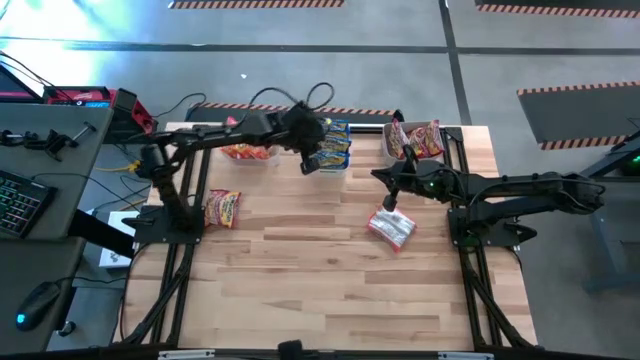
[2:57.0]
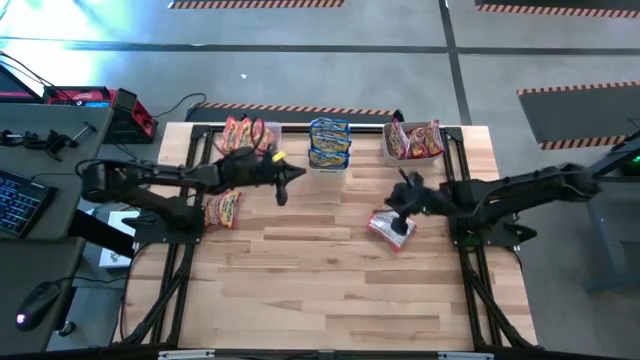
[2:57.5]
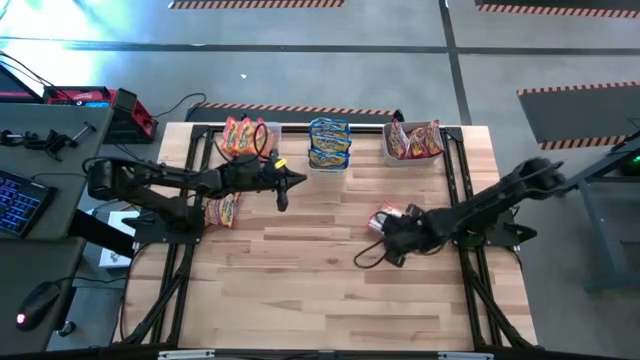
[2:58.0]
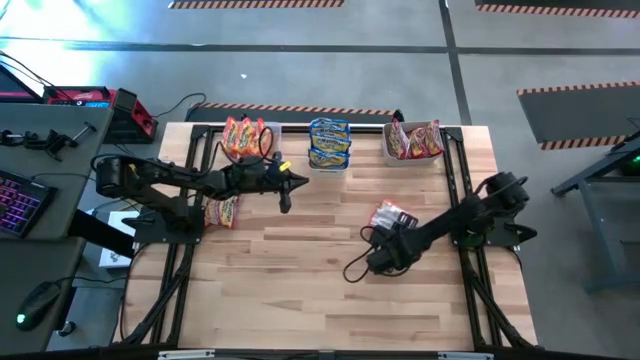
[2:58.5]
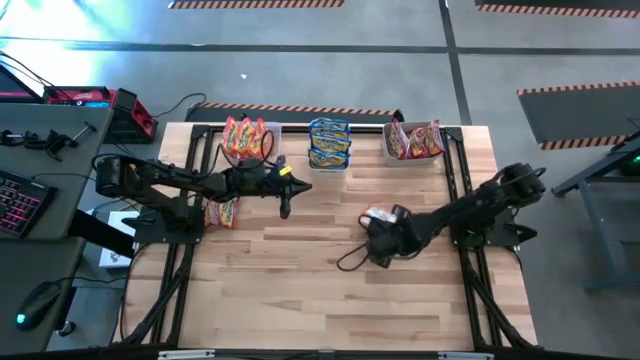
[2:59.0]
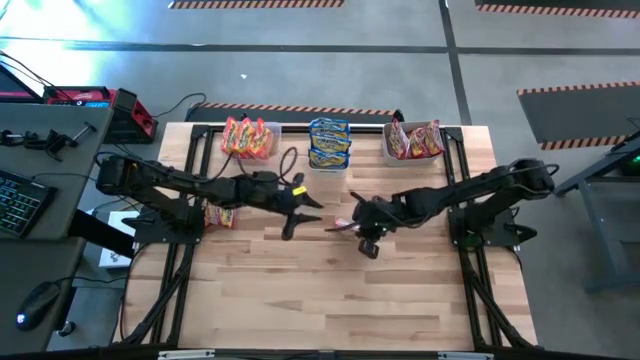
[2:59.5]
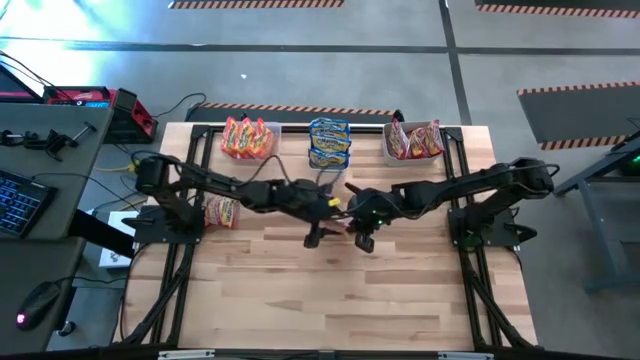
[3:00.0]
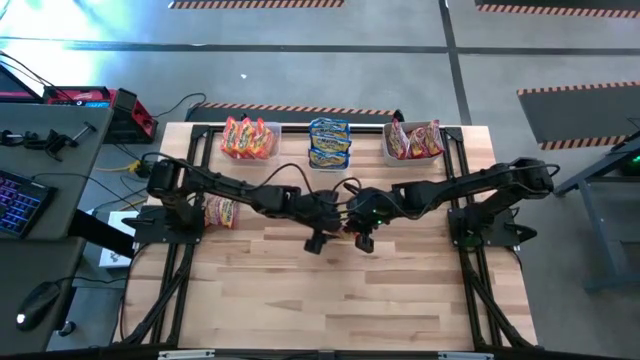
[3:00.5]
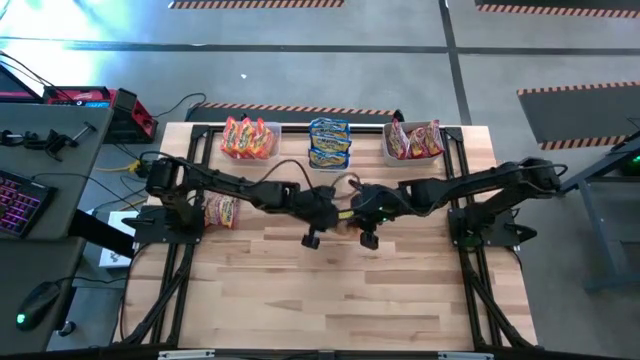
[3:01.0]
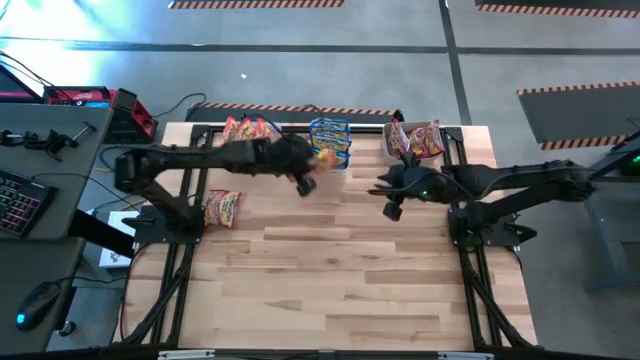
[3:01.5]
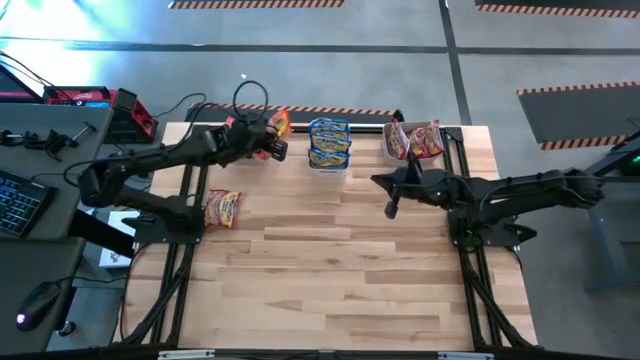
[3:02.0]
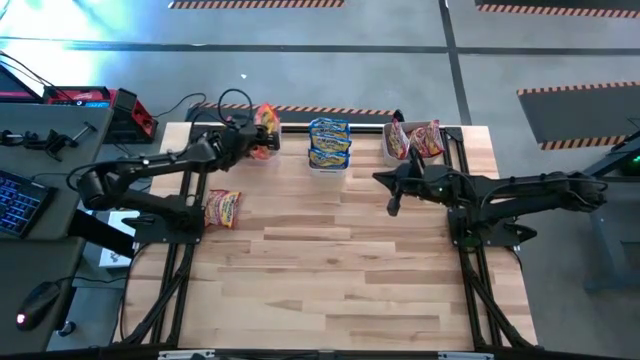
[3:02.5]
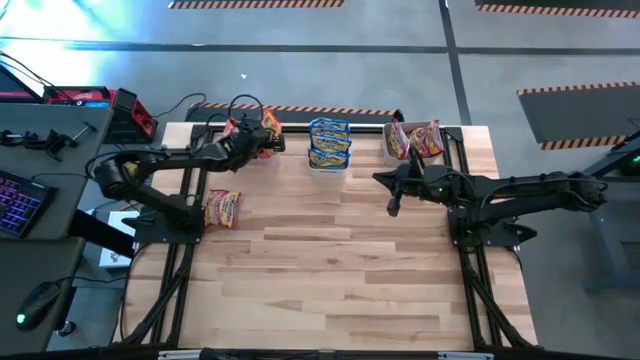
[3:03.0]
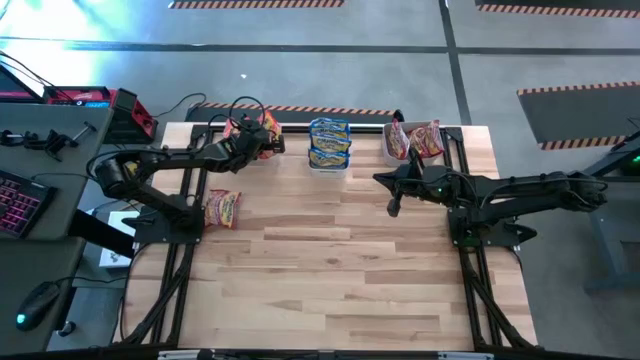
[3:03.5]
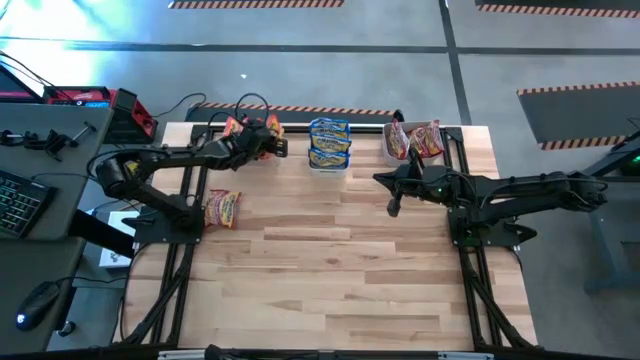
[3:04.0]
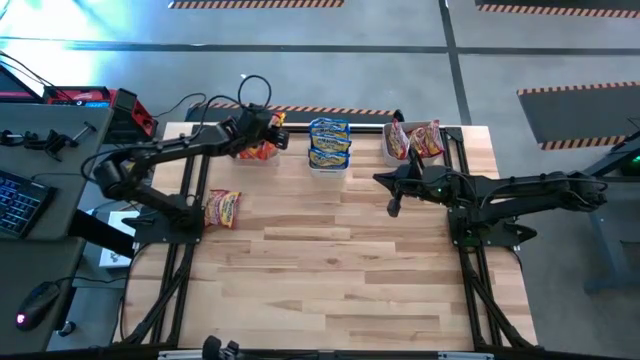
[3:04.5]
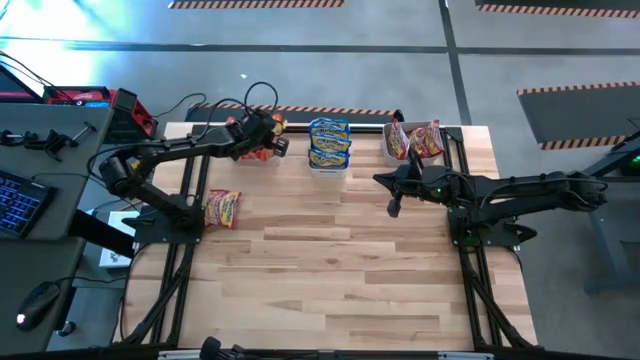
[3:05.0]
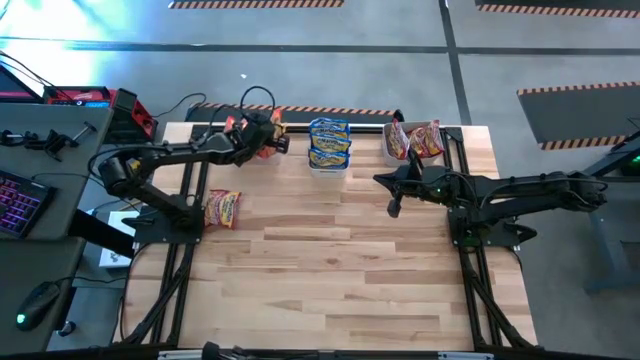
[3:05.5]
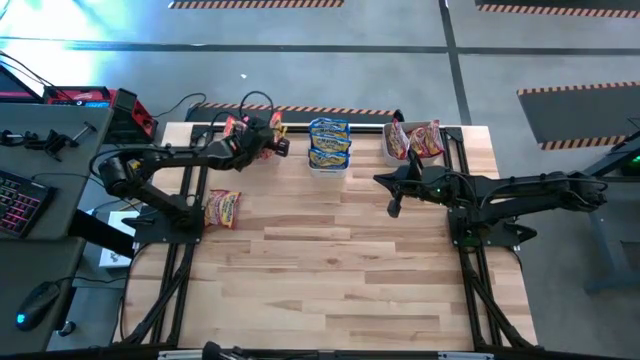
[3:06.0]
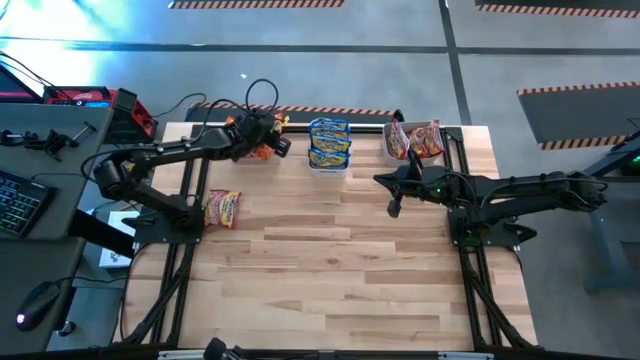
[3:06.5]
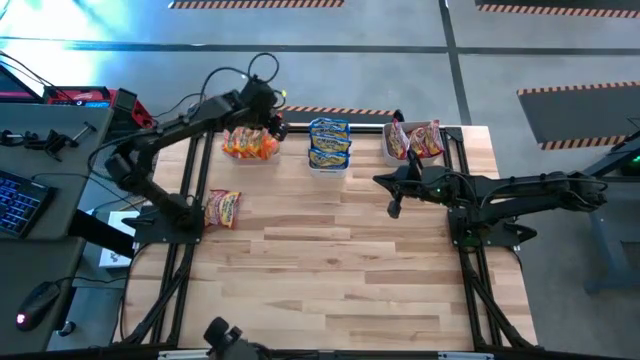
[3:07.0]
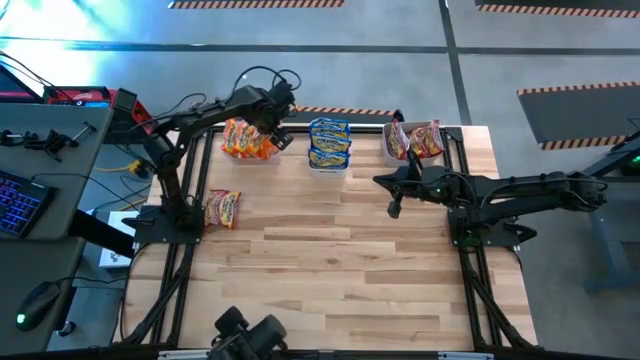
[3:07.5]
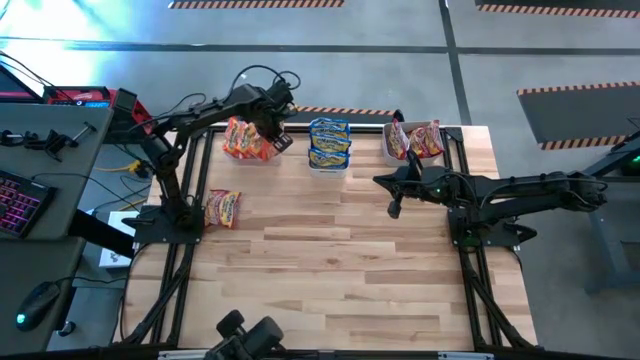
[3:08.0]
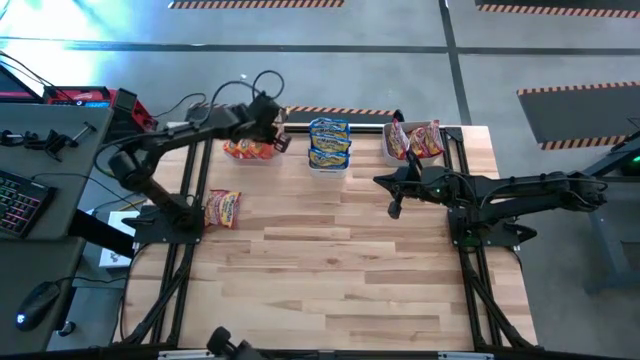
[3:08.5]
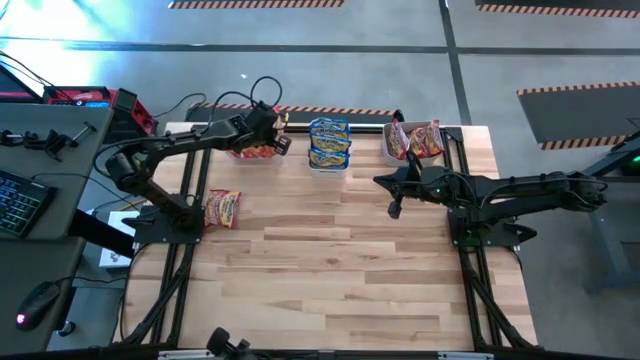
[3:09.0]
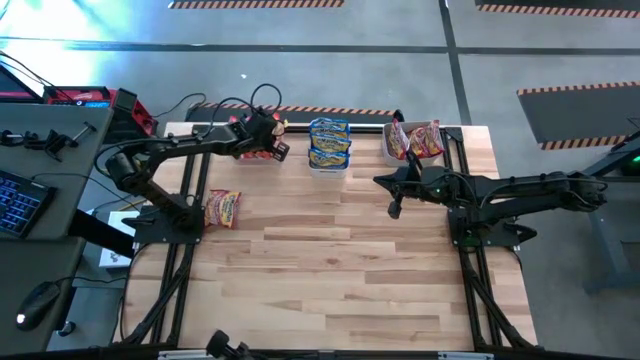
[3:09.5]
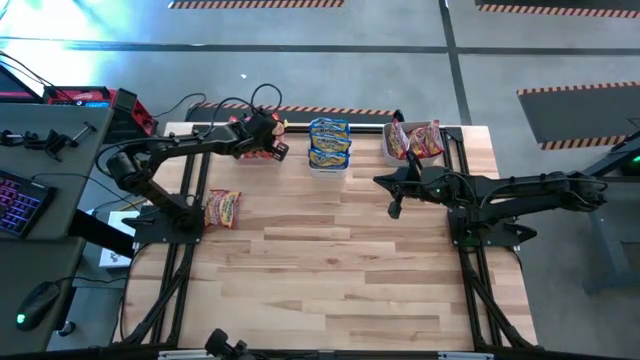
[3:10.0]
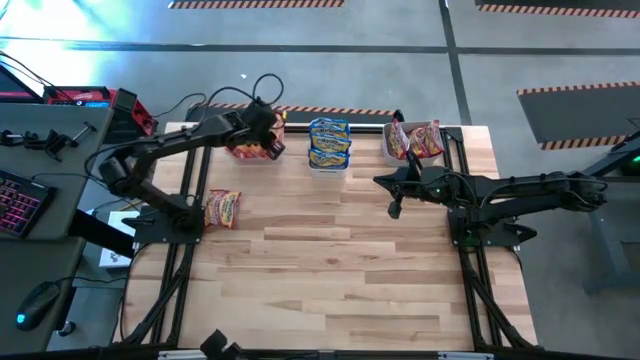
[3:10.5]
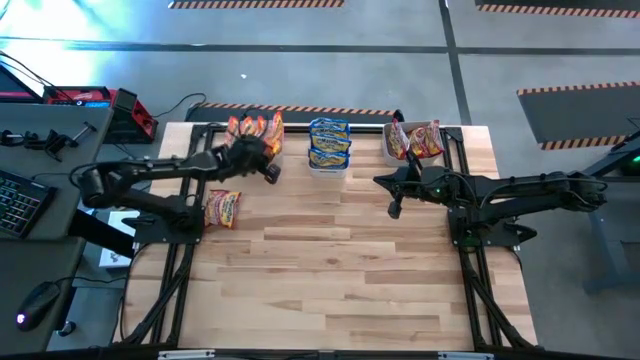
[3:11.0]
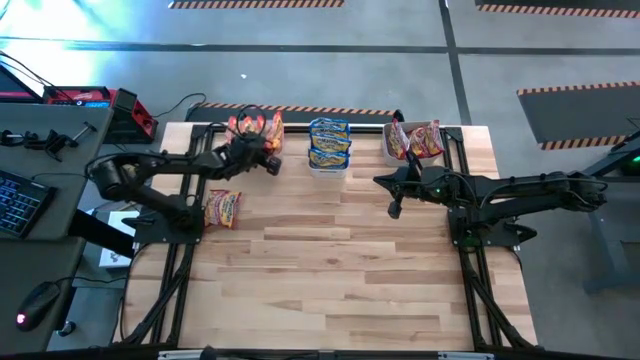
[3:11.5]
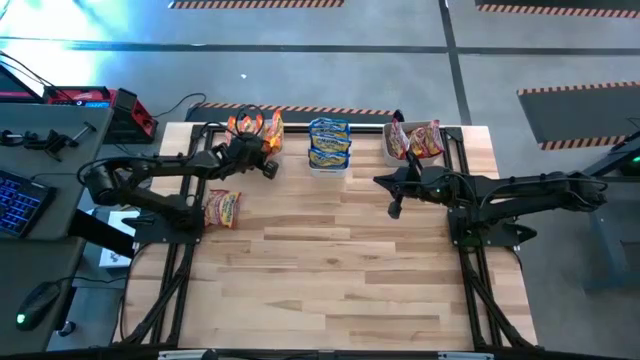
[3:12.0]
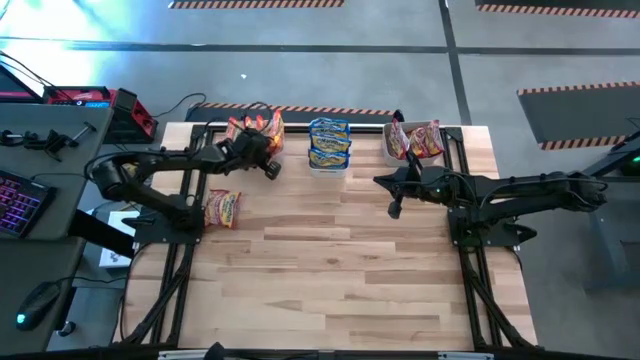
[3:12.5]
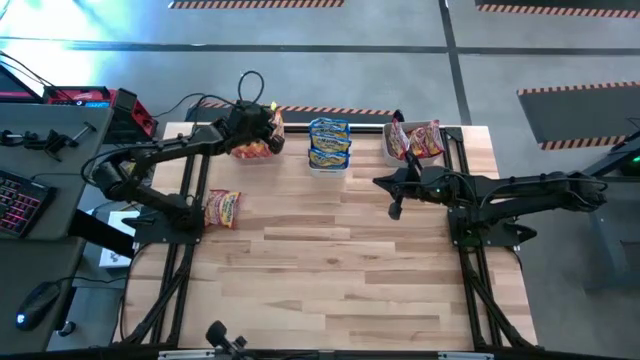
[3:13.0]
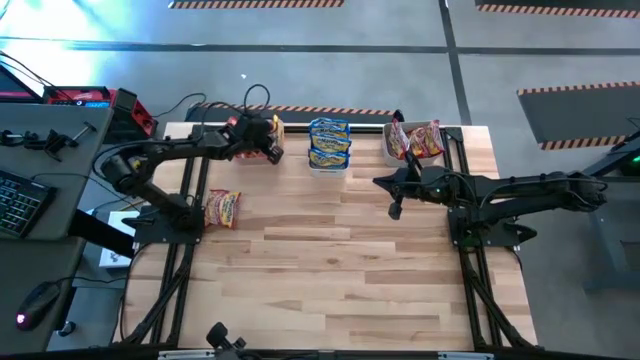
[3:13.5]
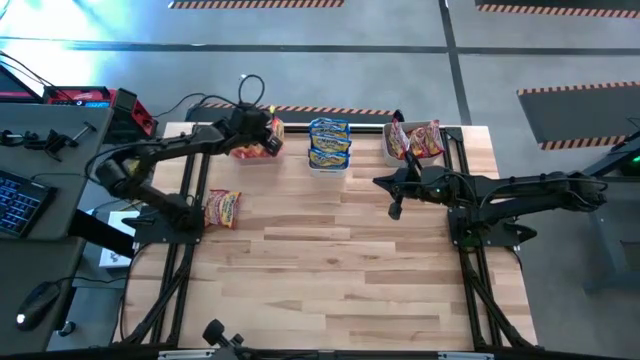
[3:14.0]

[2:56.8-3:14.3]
Task: Sort Maruchan noodles
Put the orange noodle pack into the transparent bin

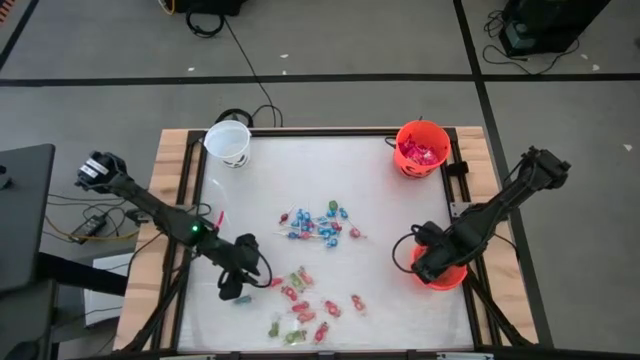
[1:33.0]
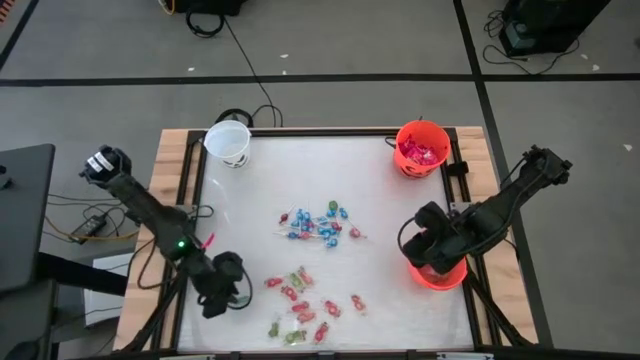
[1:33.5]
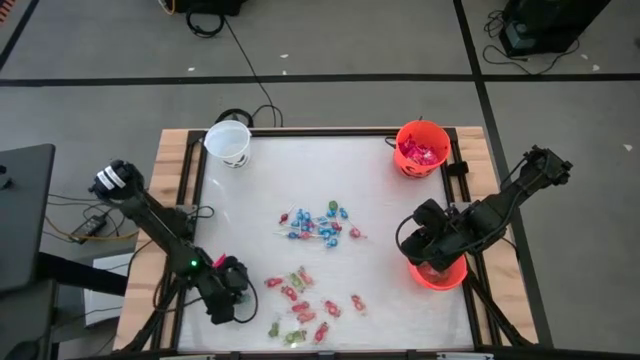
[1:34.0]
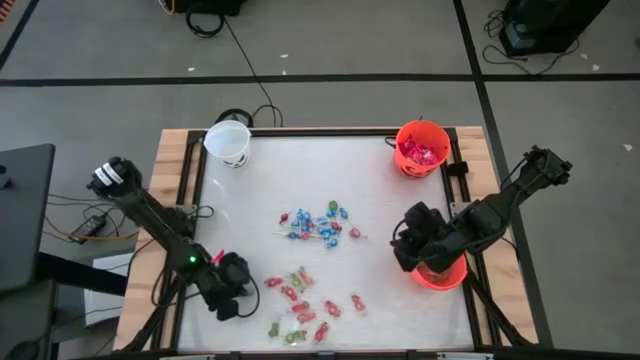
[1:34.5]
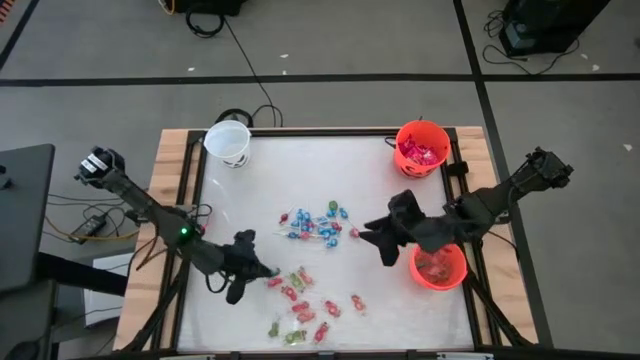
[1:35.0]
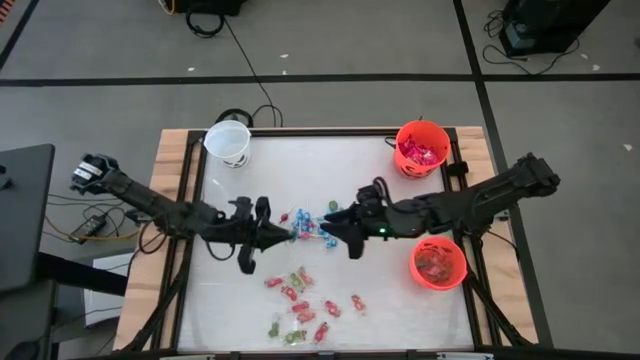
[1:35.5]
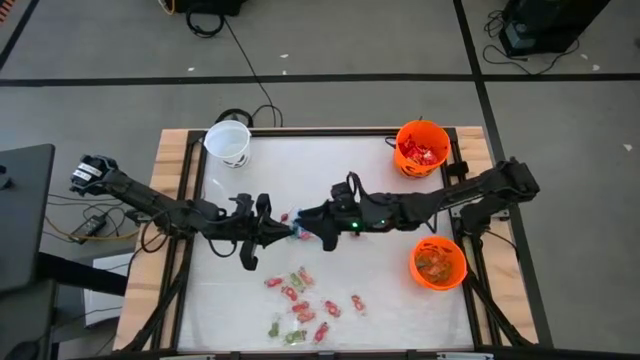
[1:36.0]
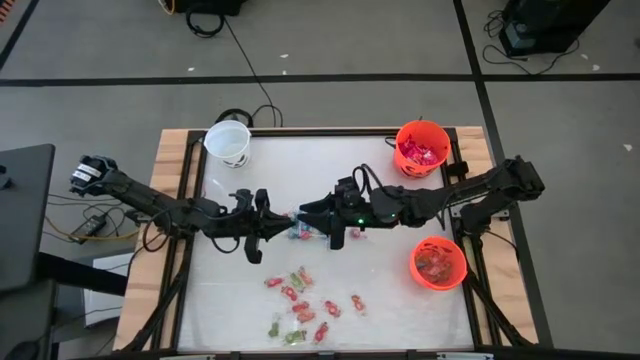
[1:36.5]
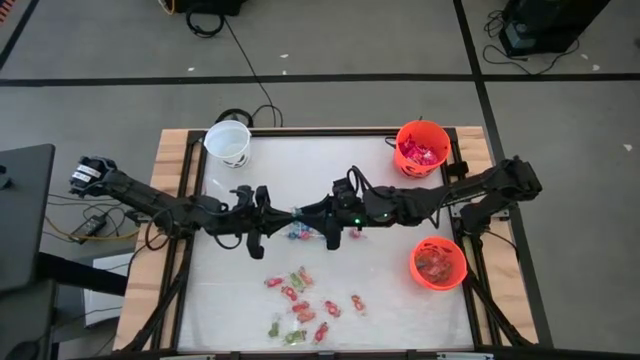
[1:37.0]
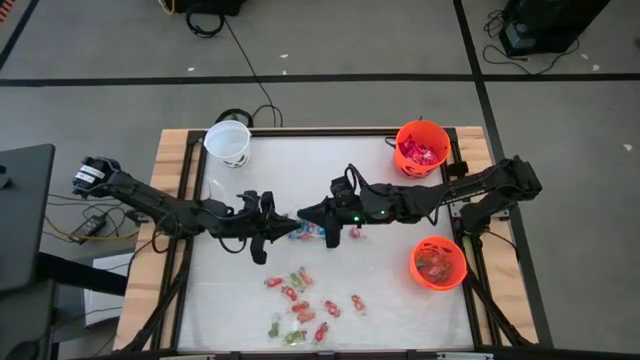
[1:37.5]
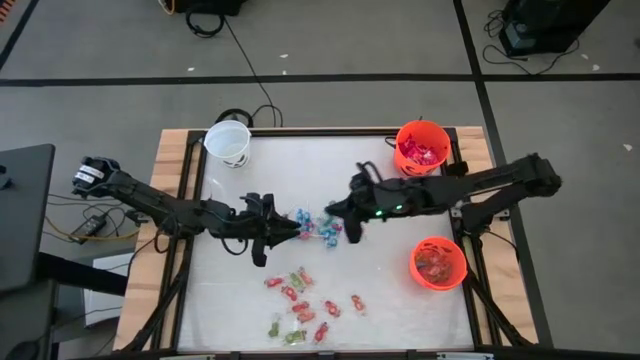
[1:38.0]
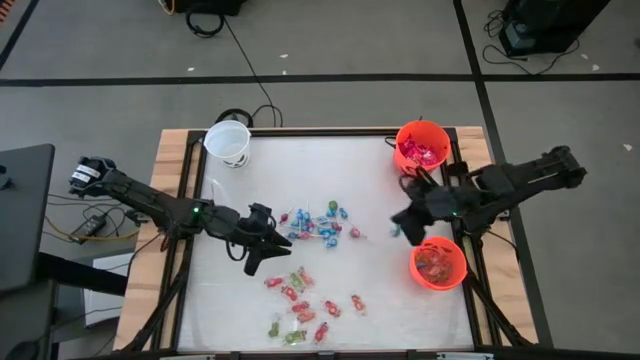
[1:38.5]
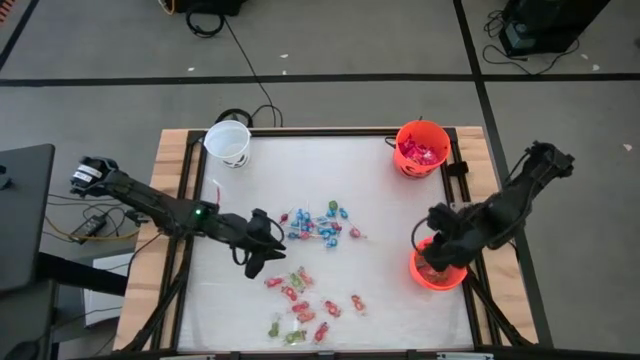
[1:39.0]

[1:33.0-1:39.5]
Task: Sort candy by brand, put in halloween buckets
Put the blue gummy into the bottom orange bucket
